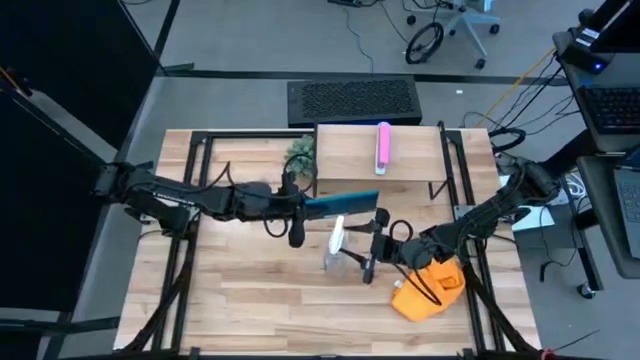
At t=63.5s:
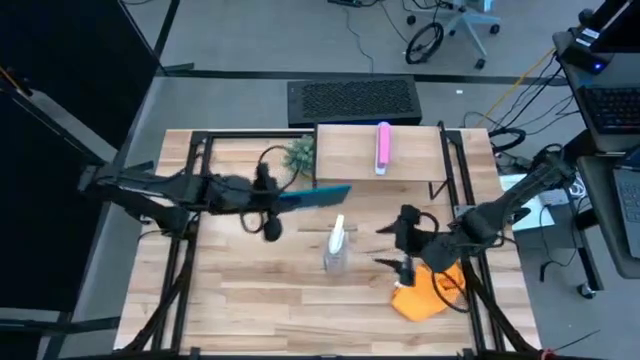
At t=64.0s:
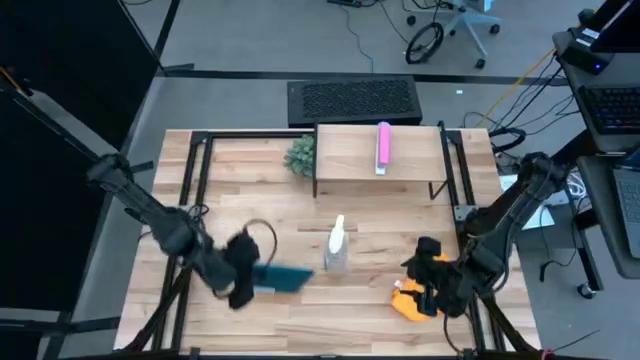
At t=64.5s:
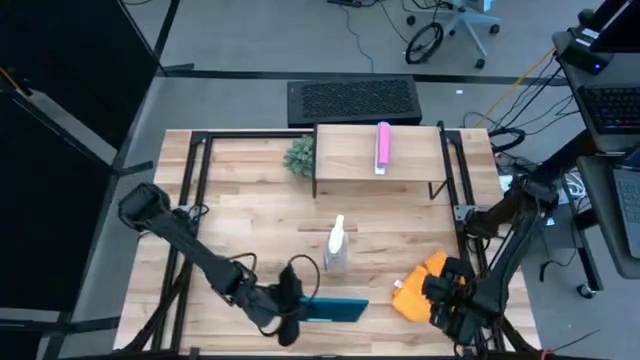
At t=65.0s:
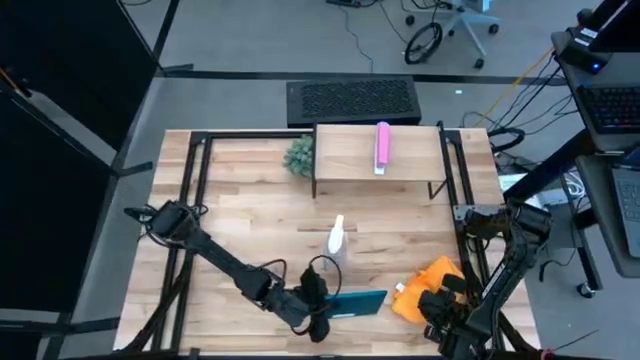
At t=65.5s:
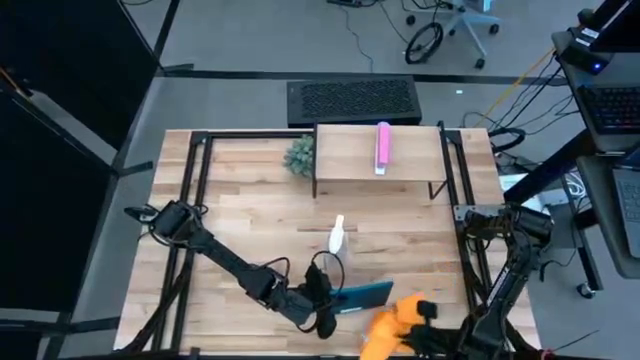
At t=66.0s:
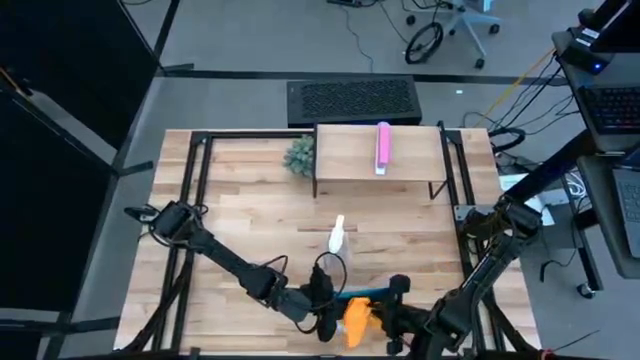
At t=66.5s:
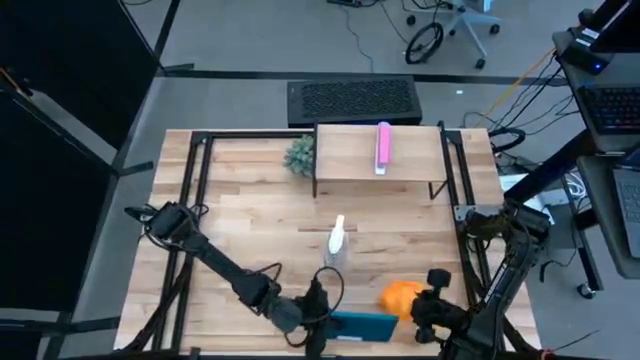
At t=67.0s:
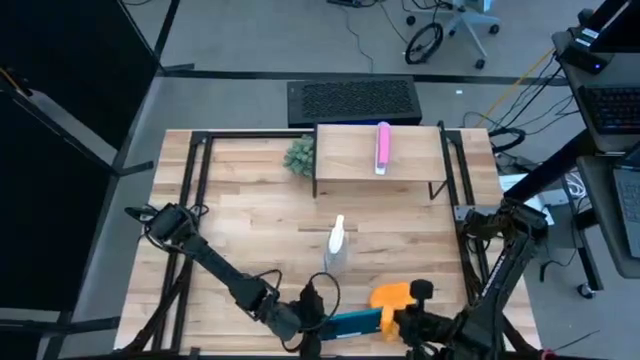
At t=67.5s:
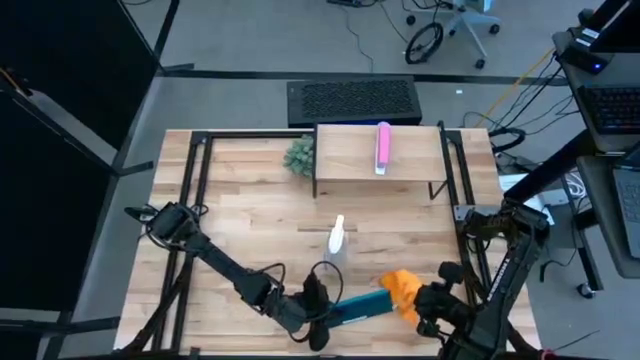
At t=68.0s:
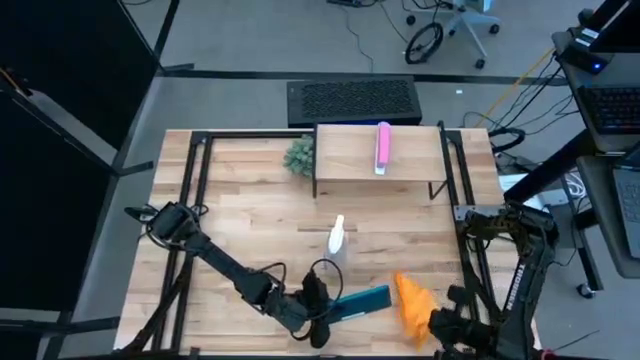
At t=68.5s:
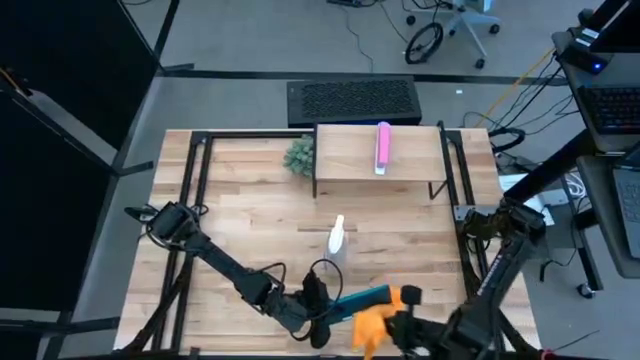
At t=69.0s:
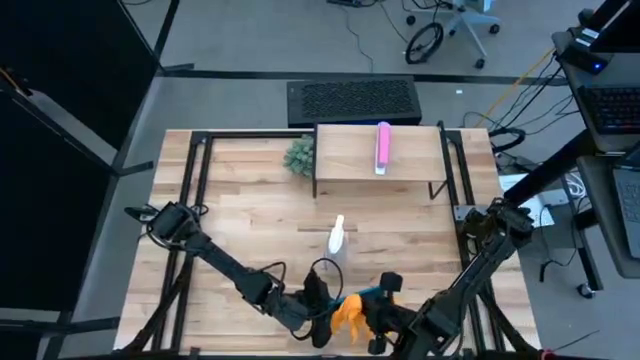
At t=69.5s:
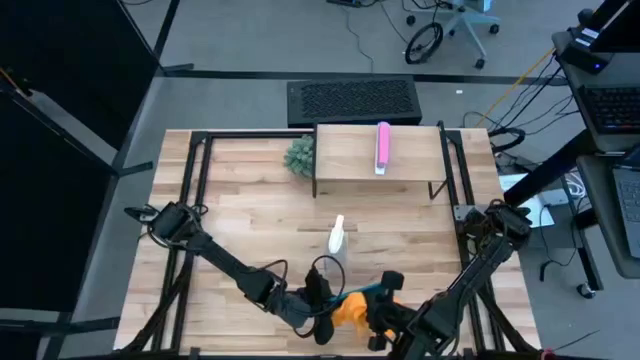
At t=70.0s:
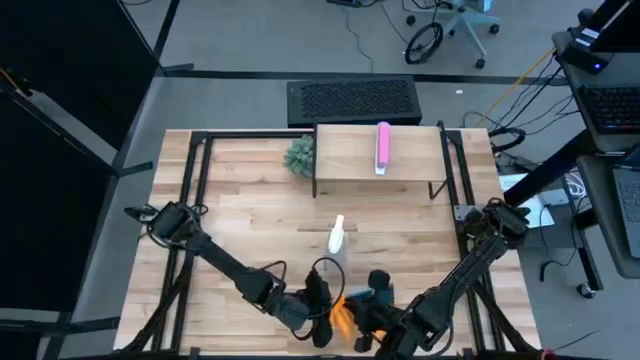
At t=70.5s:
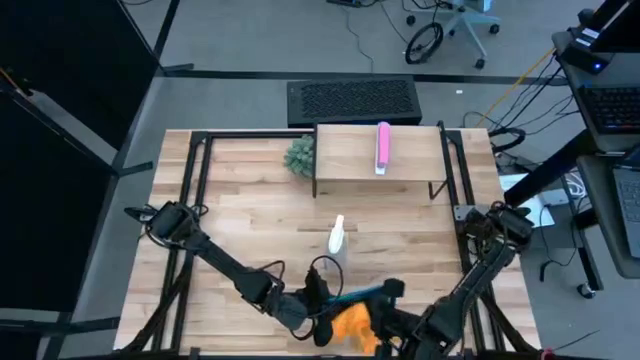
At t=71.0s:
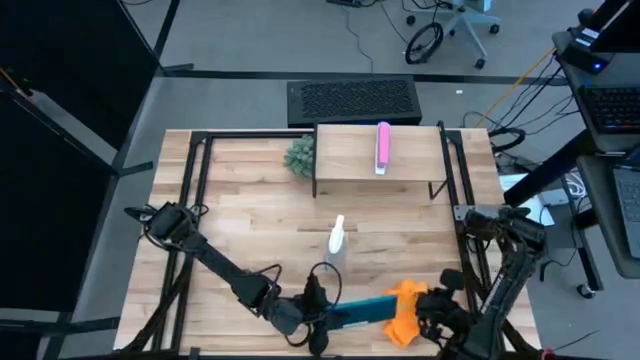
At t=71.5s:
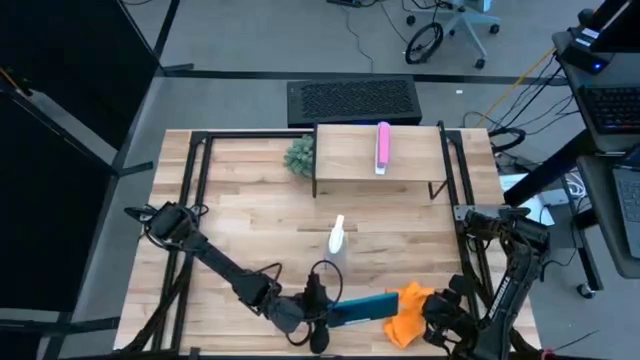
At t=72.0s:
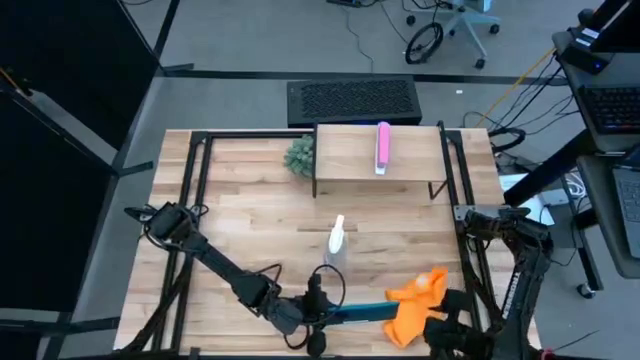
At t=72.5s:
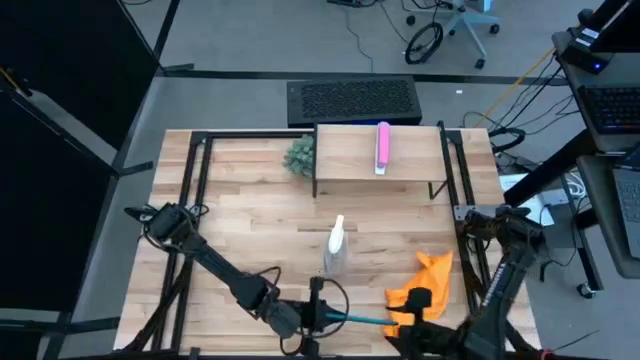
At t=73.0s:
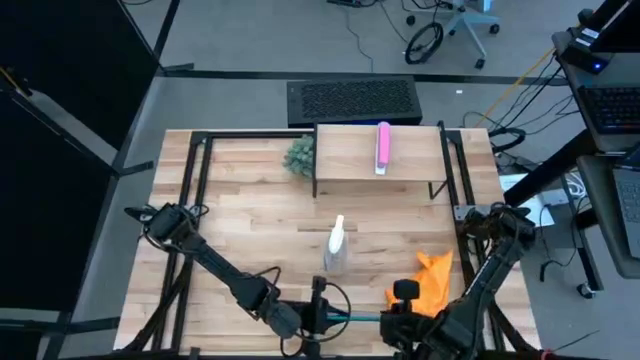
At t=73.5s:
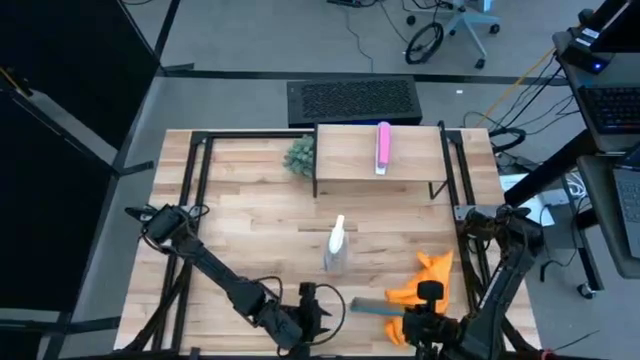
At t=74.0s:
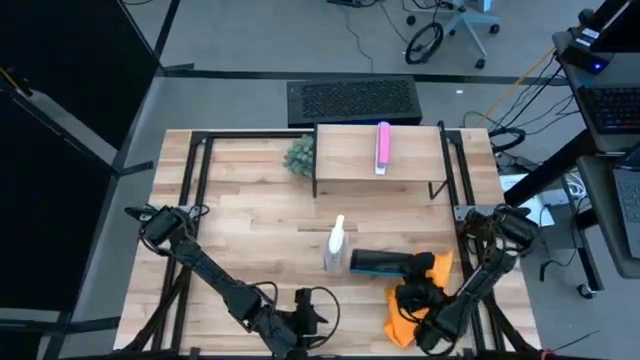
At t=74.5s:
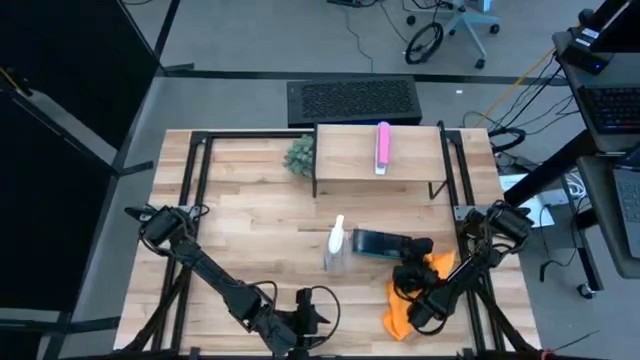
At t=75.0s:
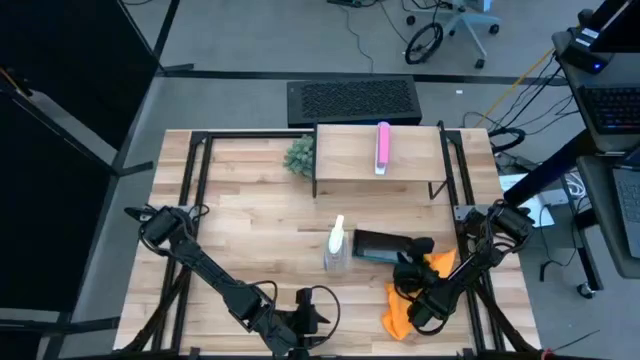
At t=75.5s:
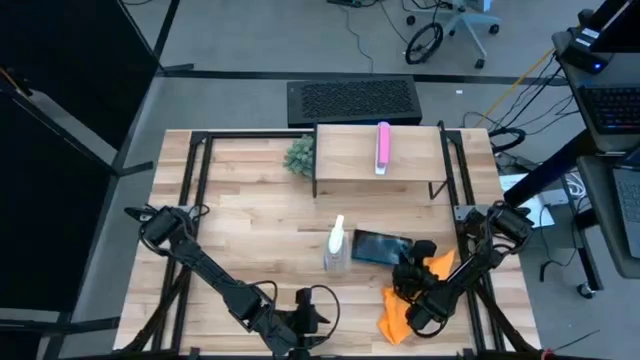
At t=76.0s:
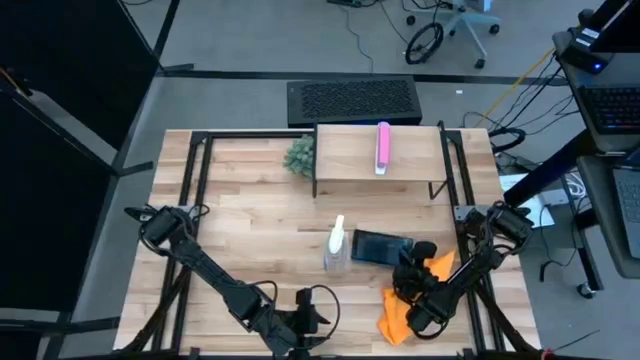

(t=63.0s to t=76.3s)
Task: Apply microfiber cloth
Wipe the back of the tablet with the orange microfiber cloth

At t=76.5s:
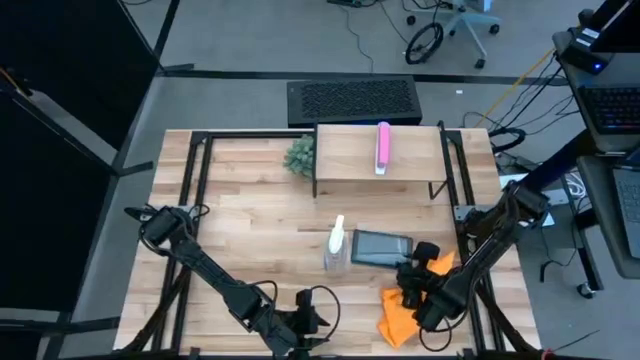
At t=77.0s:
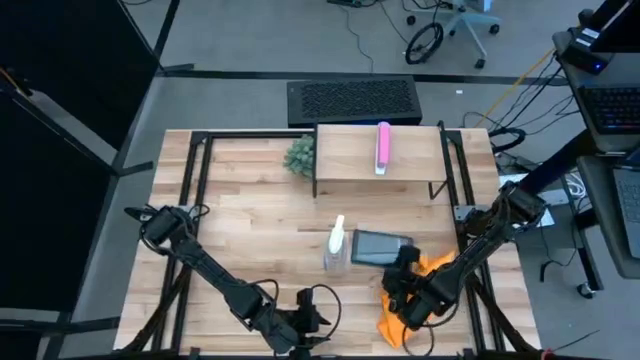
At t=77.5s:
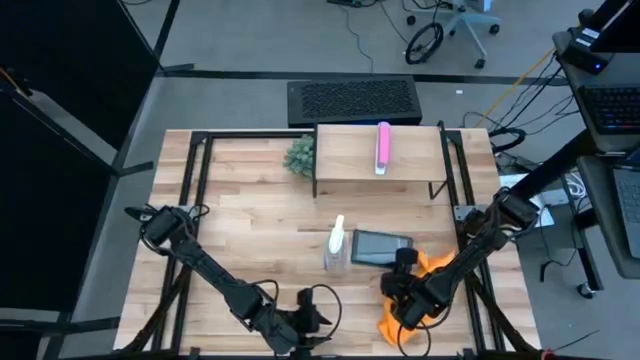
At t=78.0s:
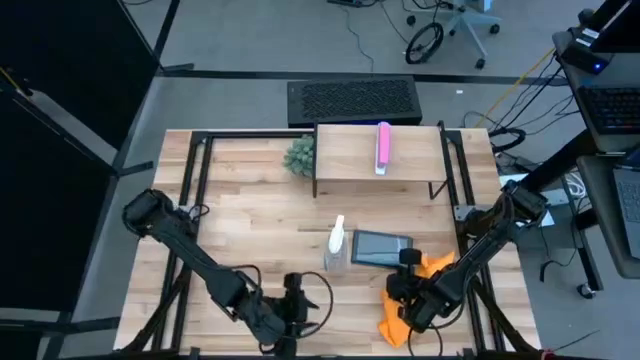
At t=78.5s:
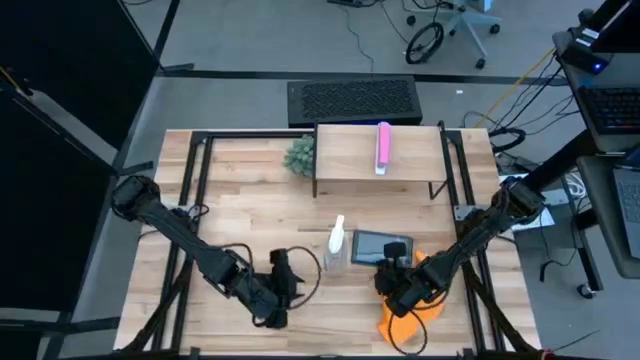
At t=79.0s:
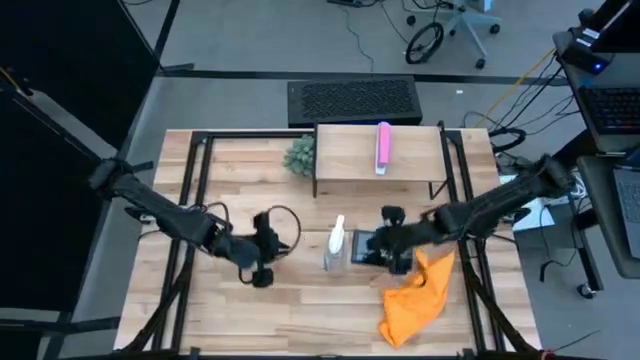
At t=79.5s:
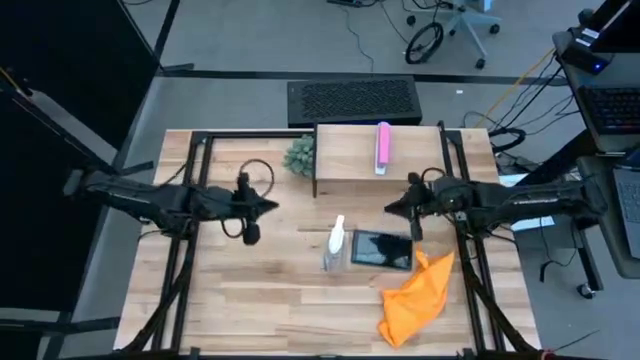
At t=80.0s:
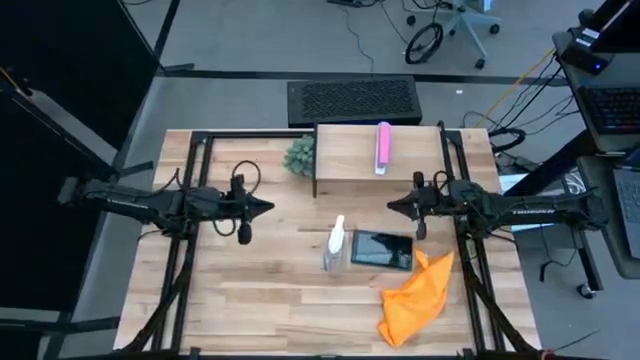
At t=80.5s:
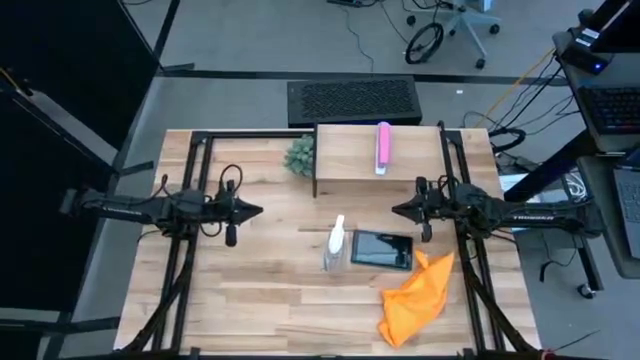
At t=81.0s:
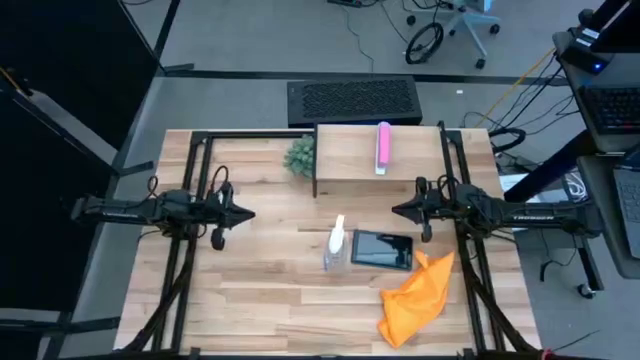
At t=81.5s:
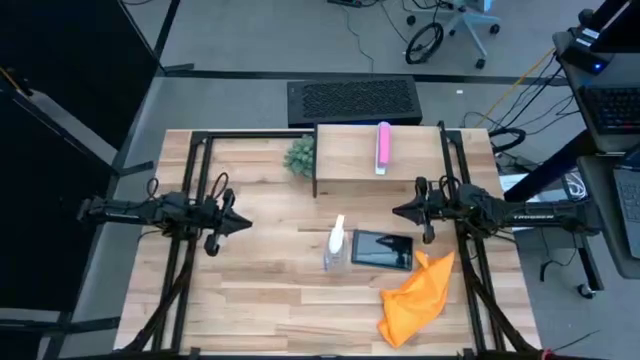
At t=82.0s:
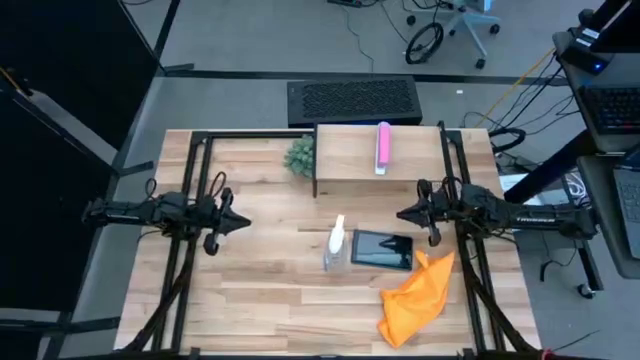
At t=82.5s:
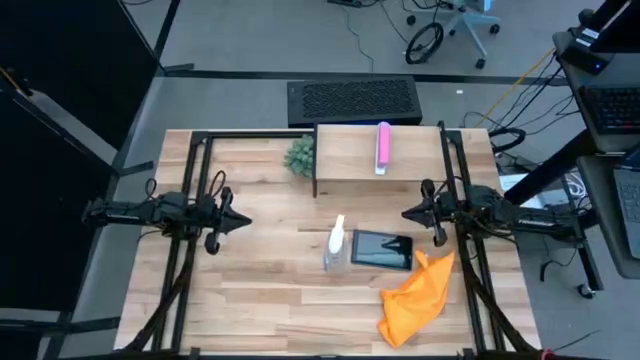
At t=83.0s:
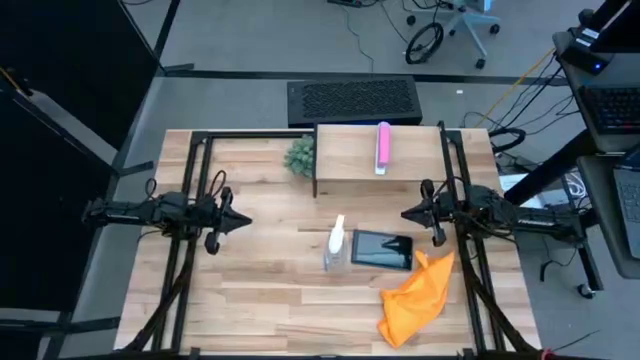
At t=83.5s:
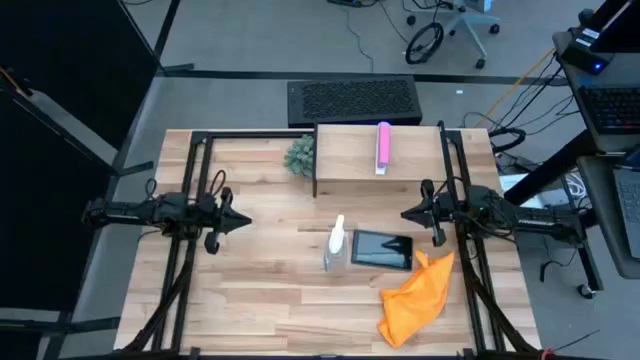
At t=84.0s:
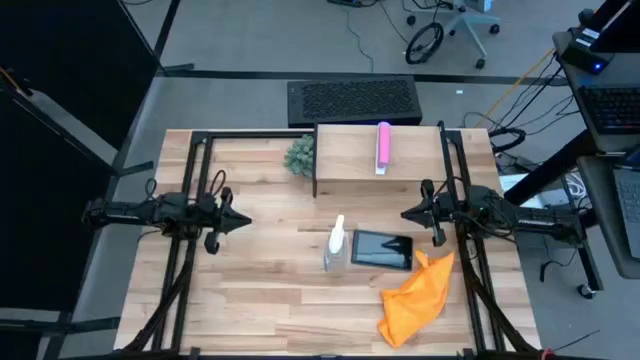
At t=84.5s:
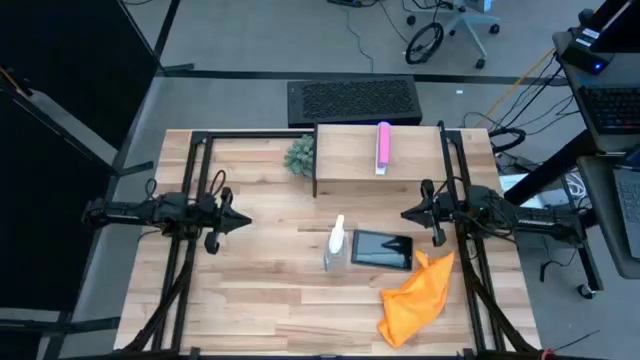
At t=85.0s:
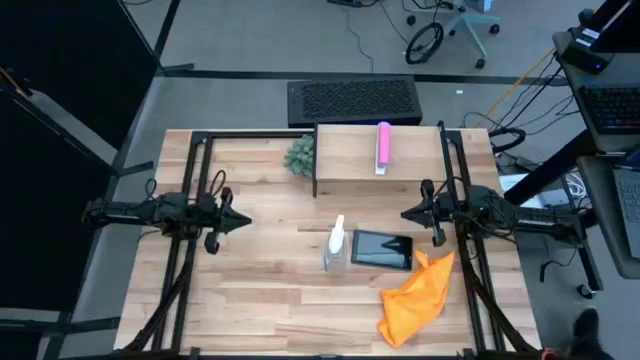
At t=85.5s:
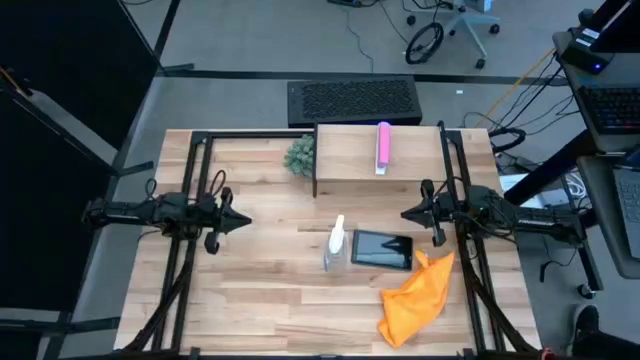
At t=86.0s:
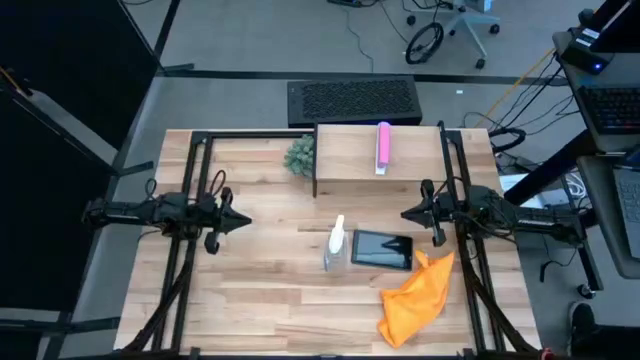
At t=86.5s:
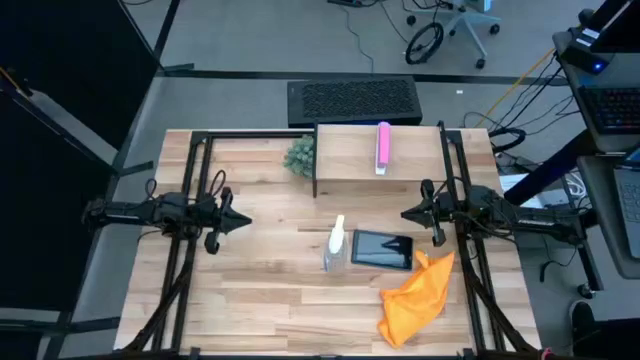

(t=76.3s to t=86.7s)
Return to Home Position
